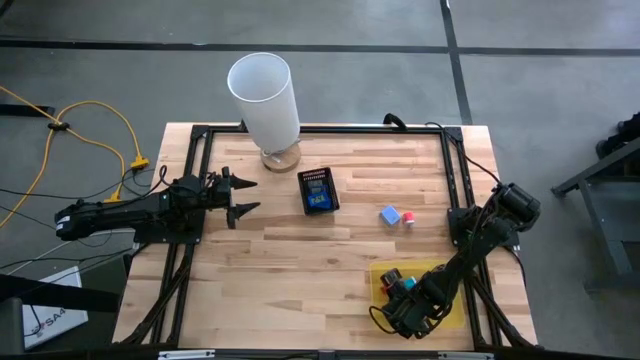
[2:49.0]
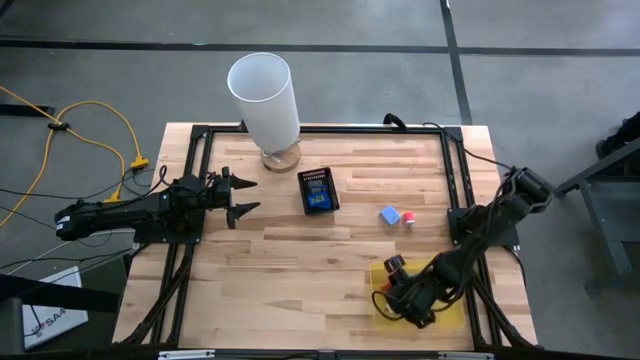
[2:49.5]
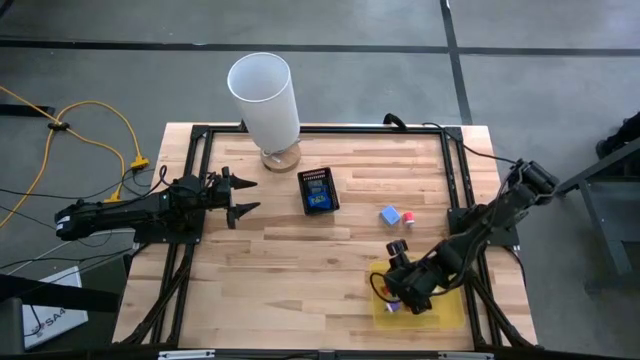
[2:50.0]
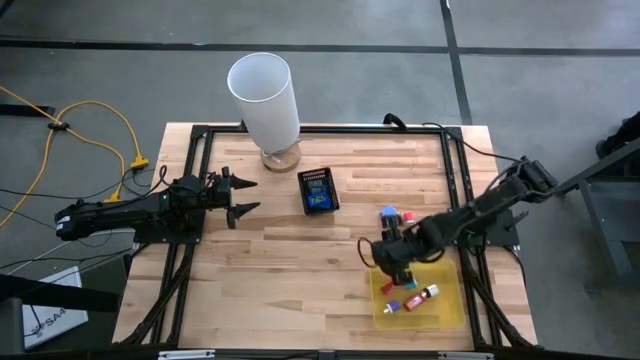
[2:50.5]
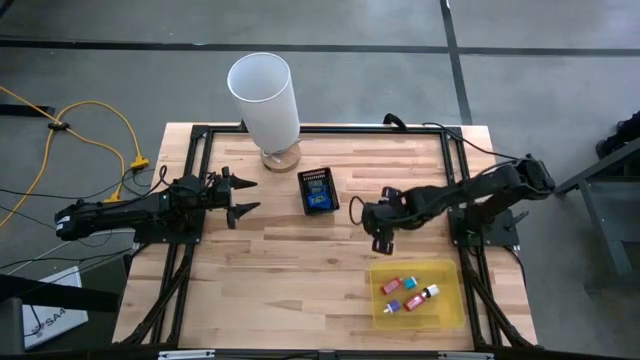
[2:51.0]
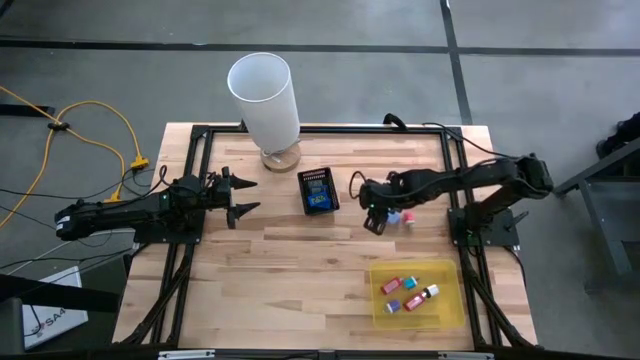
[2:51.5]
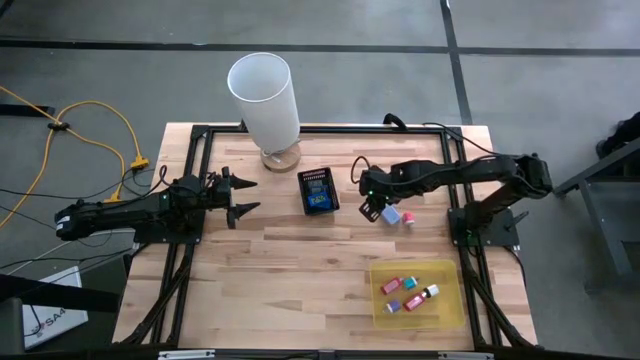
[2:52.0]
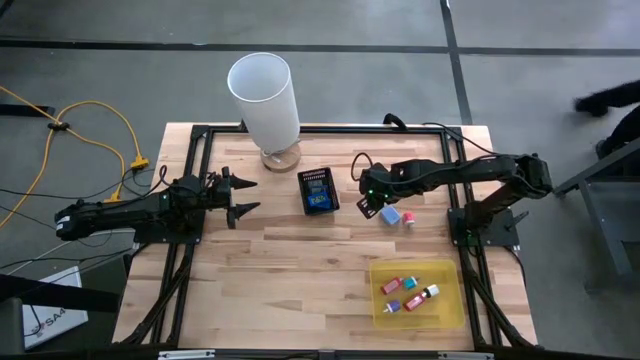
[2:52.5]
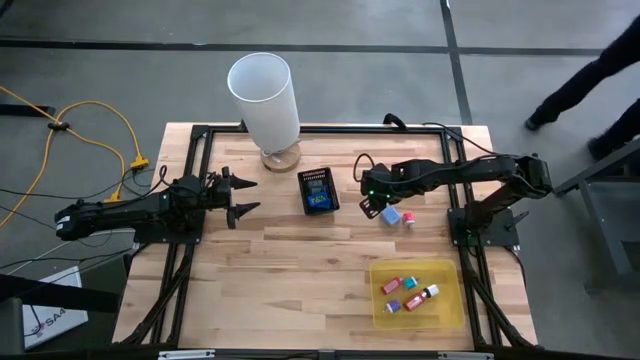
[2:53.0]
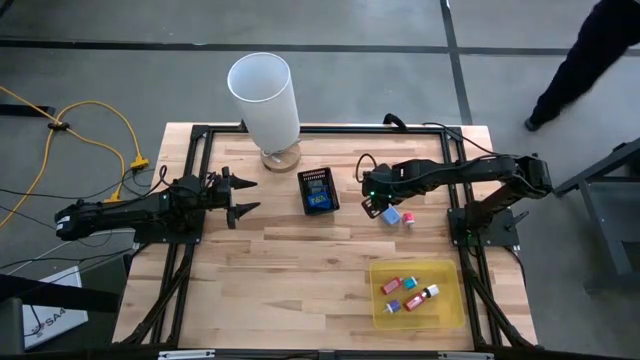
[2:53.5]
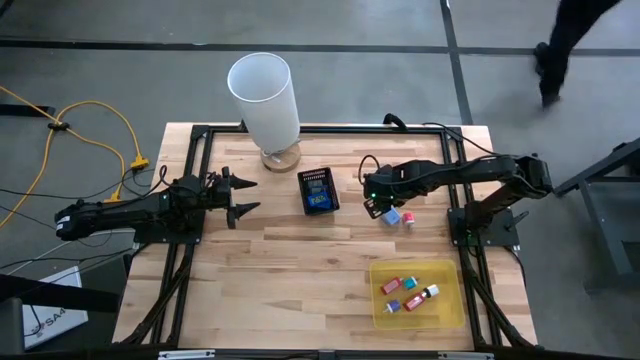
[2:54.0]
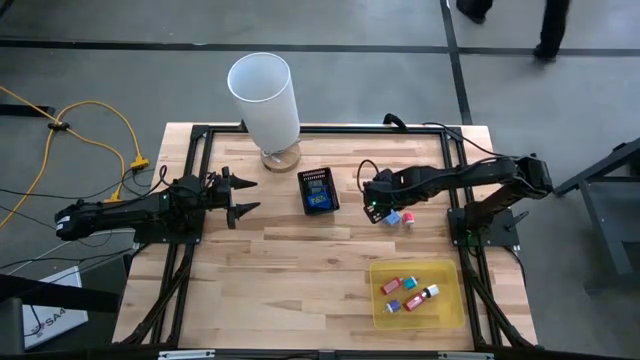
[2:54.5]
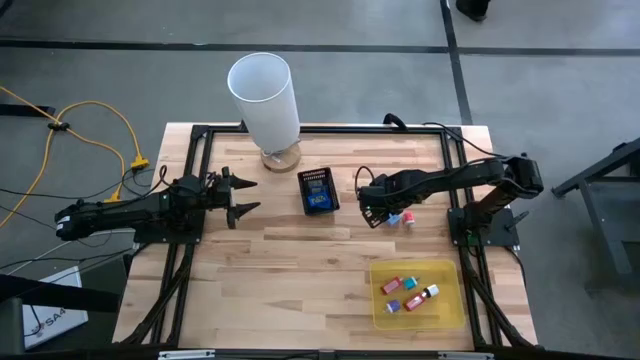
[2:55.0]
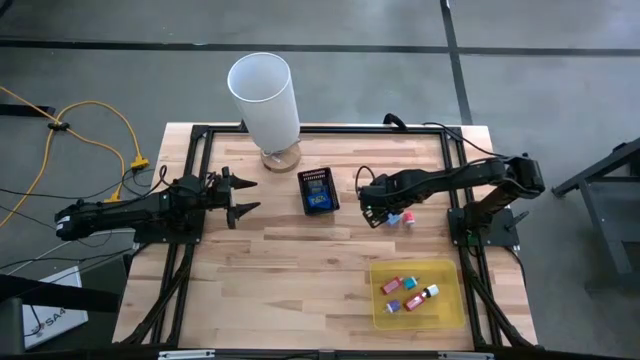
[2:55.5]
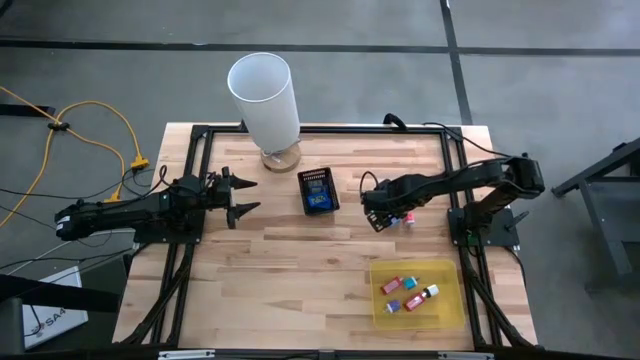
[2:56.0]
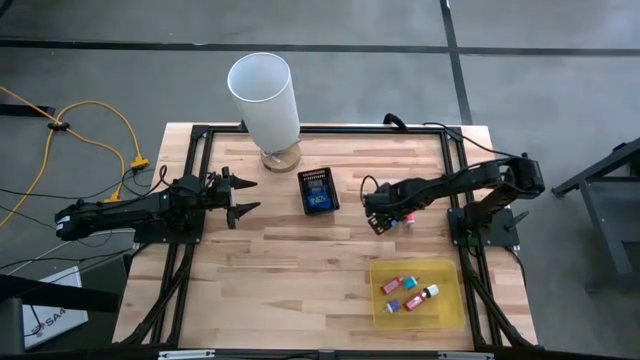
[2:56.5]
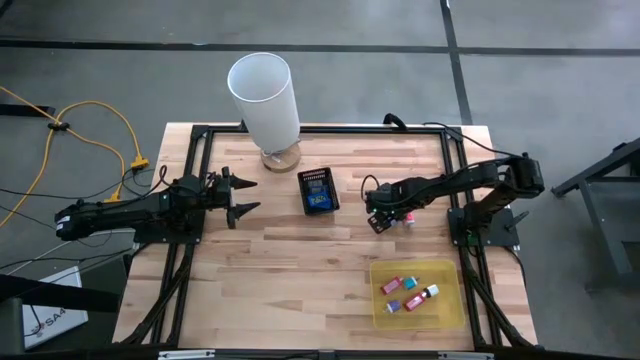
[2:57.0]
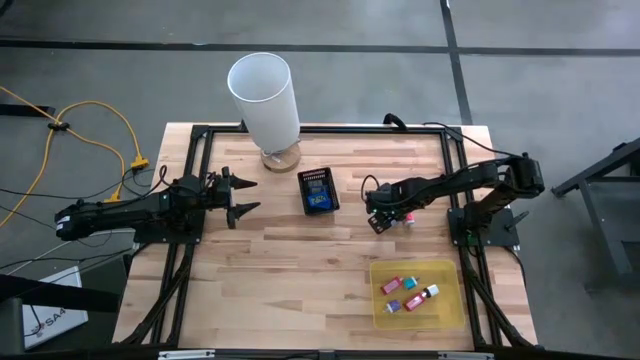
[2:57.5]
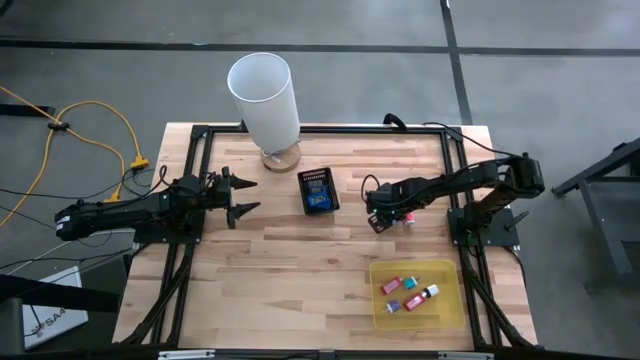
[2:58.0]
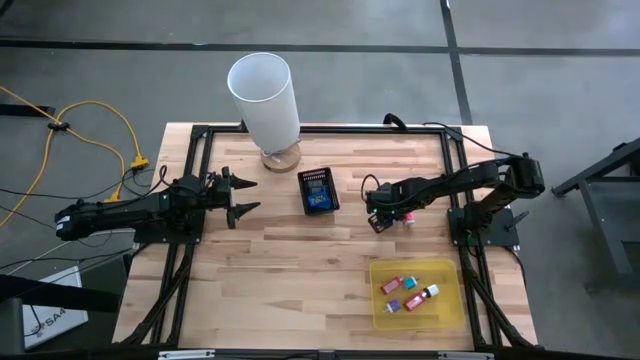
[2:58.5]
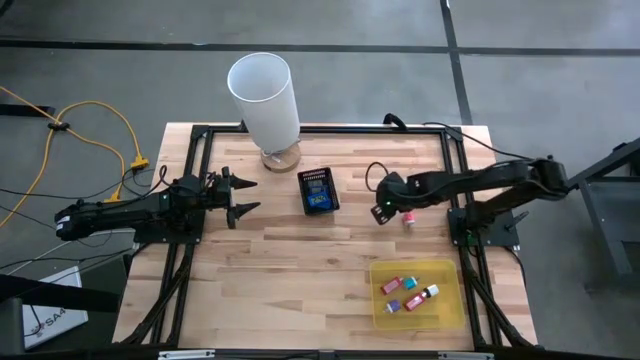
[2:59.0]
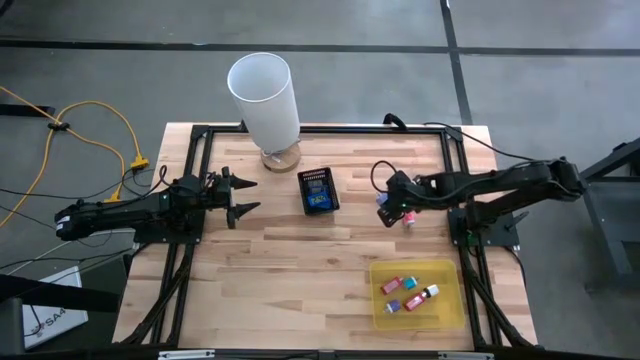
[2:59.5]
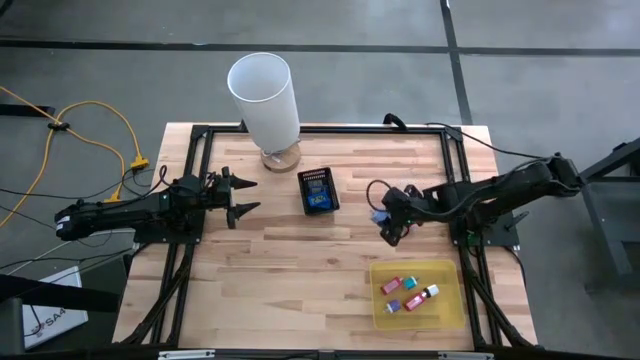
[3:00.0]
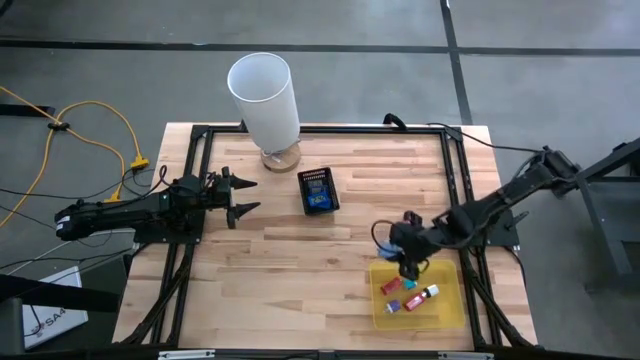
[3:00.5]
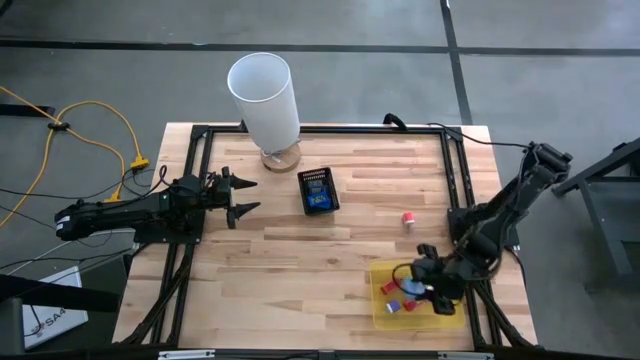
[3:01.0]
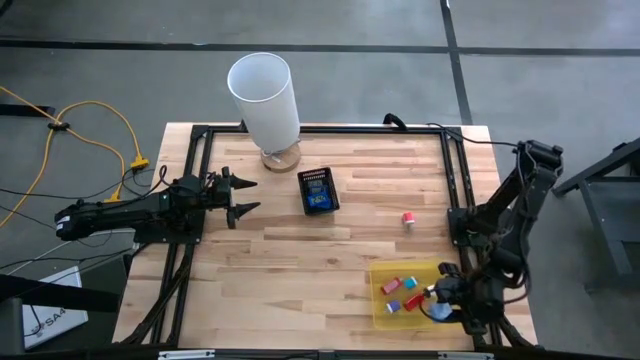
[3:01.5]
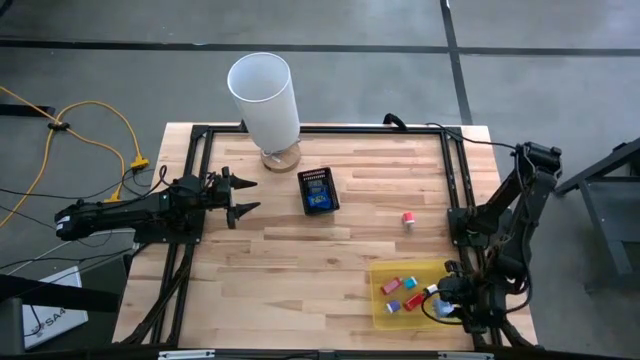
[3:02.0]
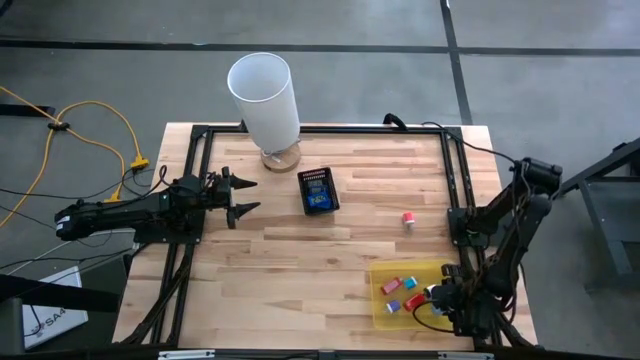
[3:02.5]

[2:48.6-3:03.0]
Task: Pick & Place Office items
Put the blue big charger adaptor into the yellow bin

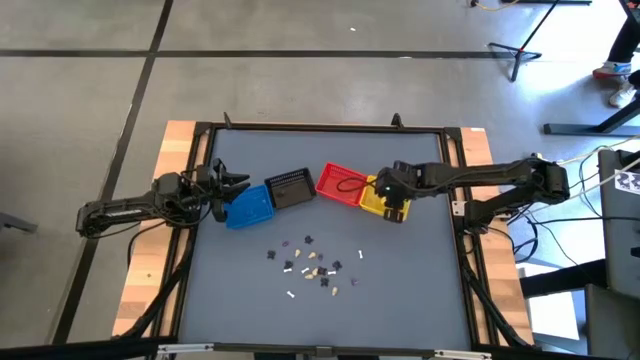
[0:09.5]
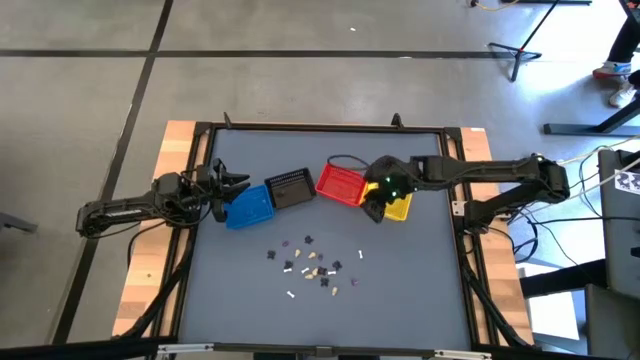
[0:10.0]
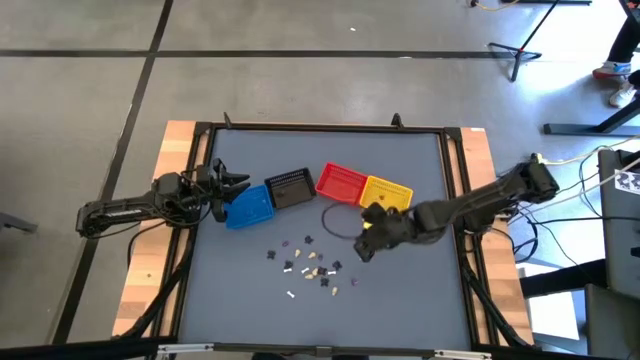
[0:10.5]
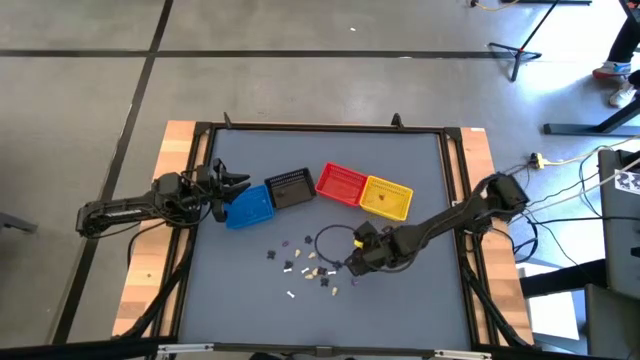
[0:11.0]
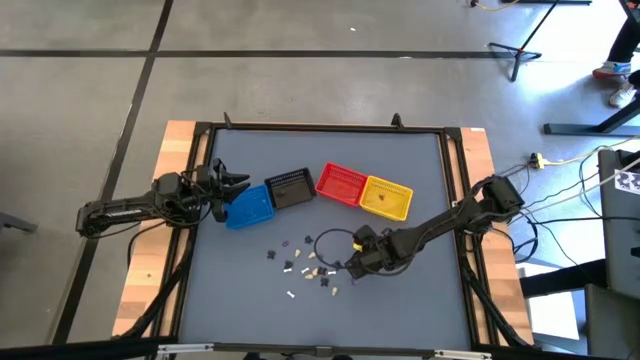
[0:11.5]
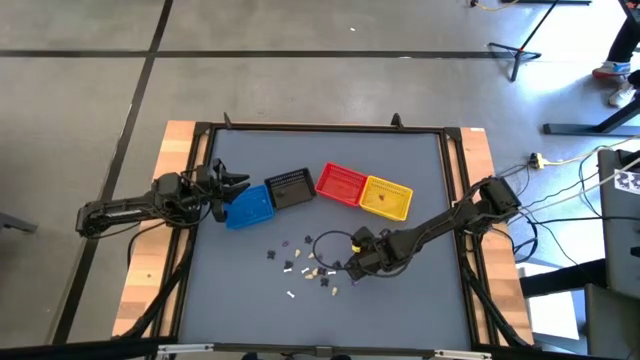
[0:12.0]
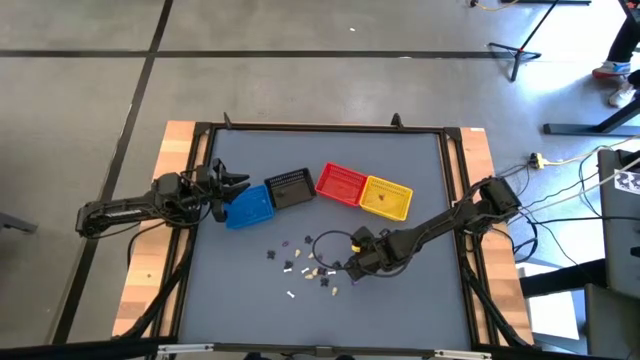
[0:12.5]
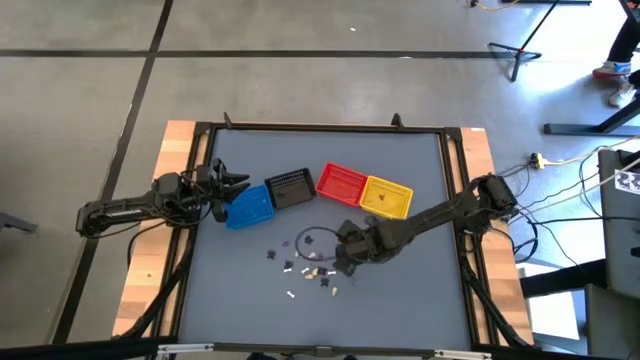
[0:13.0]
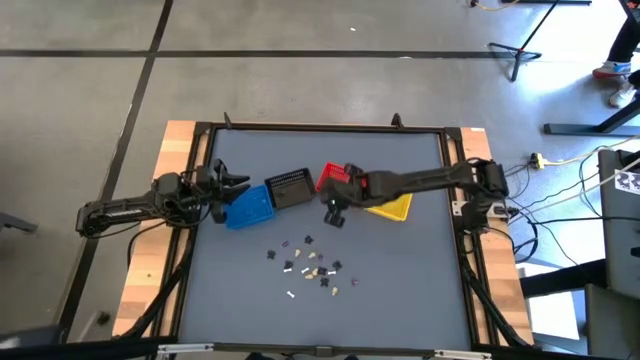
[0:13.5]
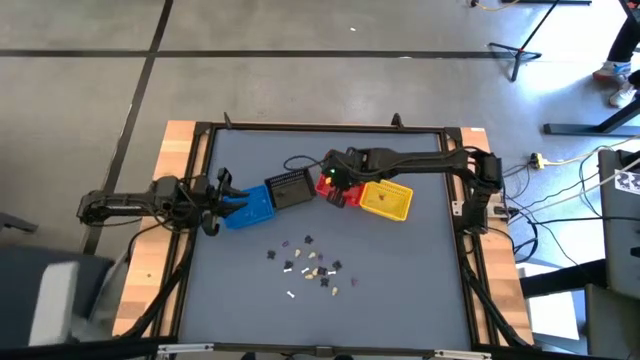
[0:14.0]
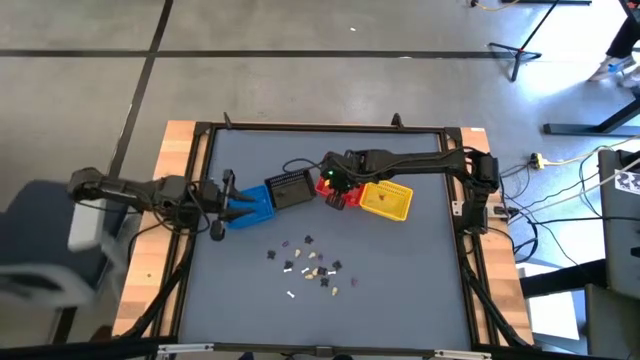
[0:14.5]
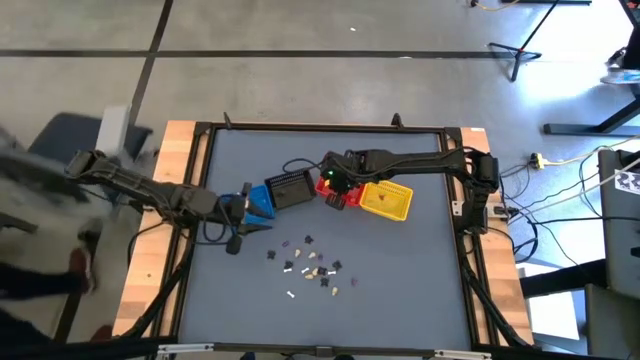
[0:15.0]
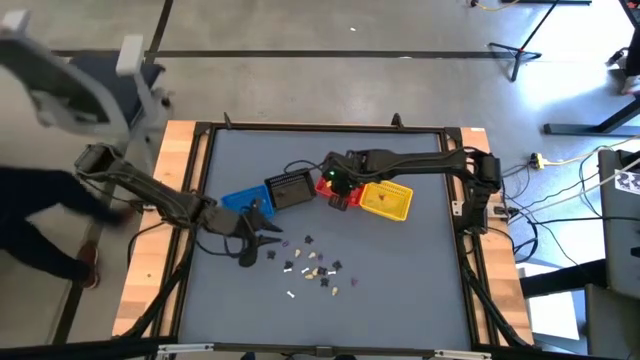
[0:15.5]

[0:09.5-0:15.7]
Task: Sort Halloween decoration
Put the white bone toy into the red bin
